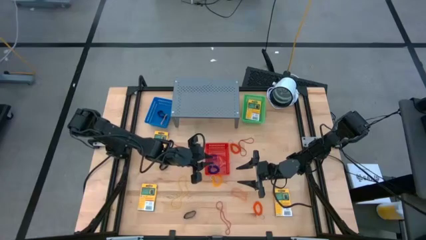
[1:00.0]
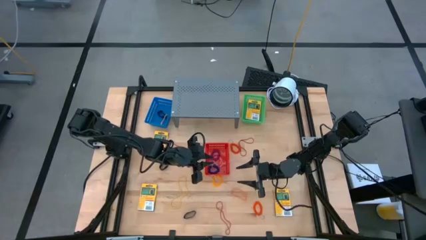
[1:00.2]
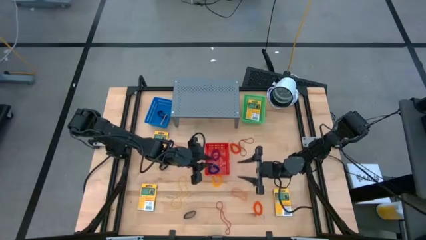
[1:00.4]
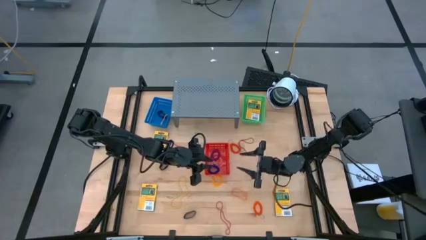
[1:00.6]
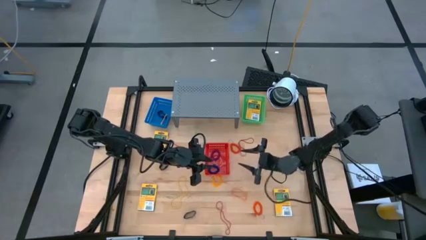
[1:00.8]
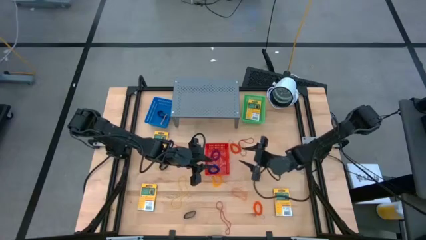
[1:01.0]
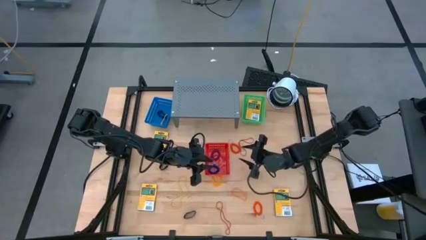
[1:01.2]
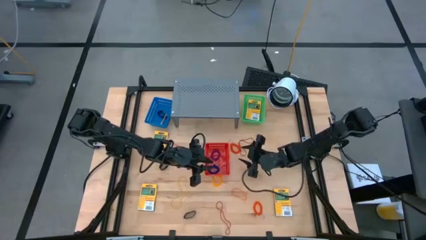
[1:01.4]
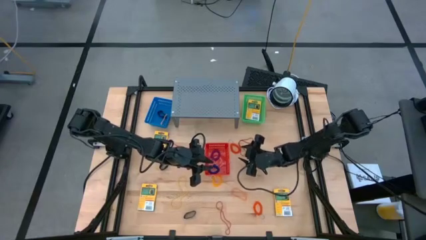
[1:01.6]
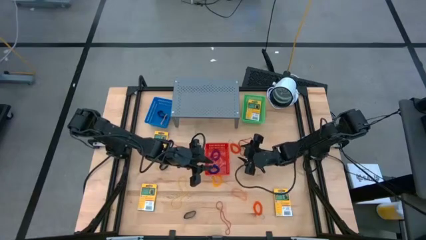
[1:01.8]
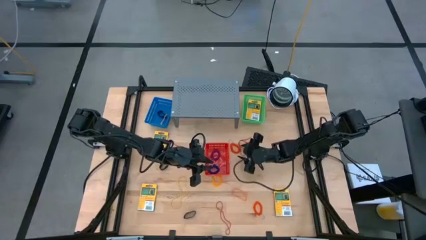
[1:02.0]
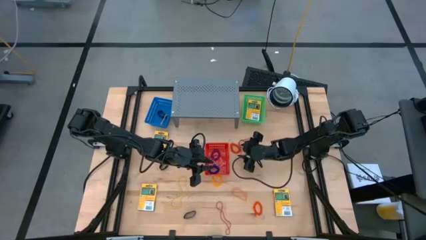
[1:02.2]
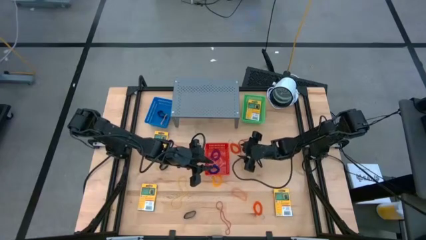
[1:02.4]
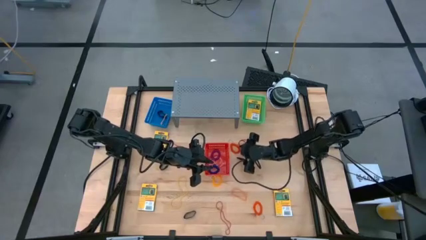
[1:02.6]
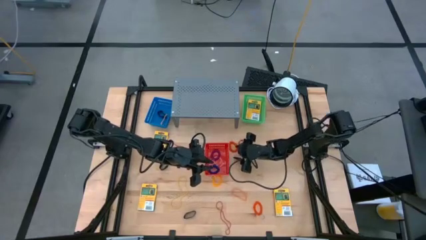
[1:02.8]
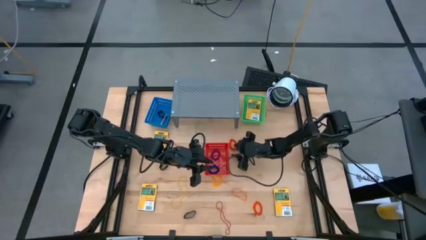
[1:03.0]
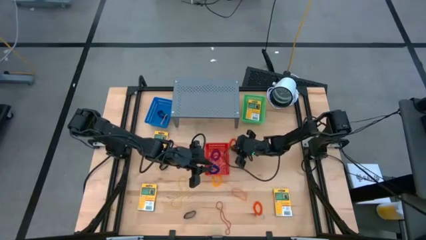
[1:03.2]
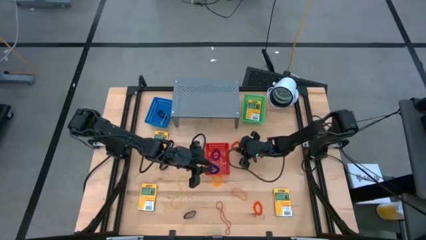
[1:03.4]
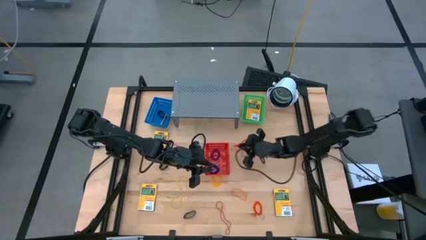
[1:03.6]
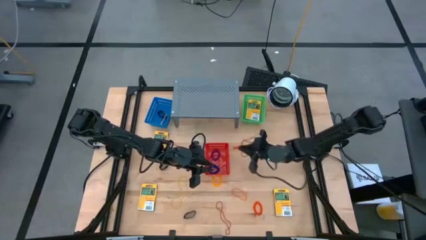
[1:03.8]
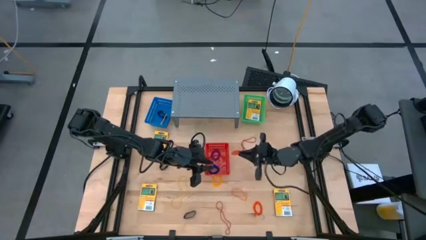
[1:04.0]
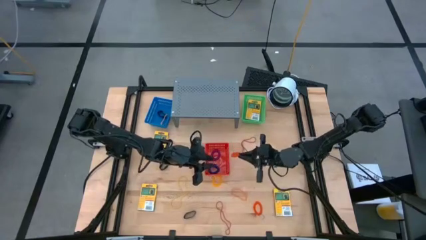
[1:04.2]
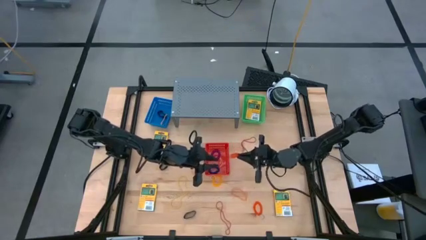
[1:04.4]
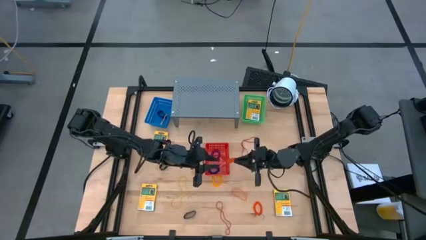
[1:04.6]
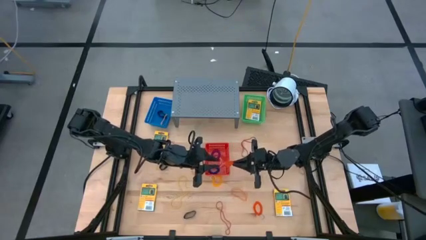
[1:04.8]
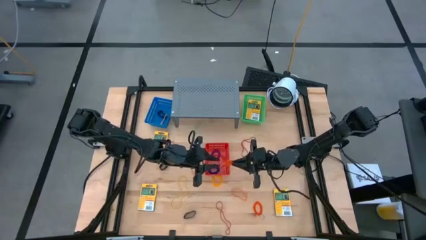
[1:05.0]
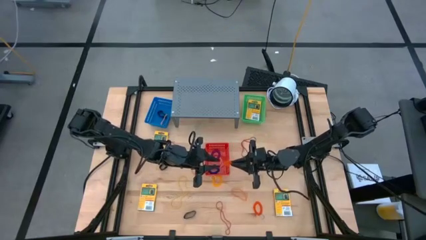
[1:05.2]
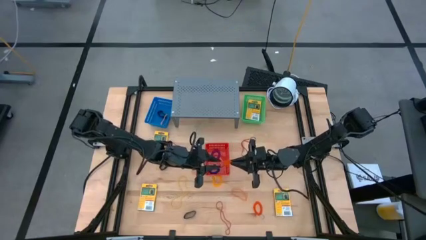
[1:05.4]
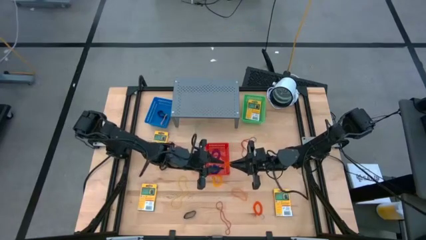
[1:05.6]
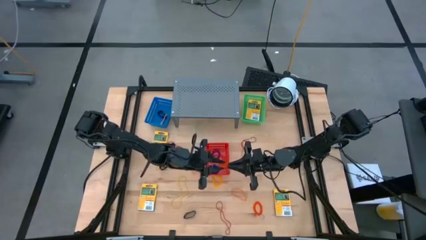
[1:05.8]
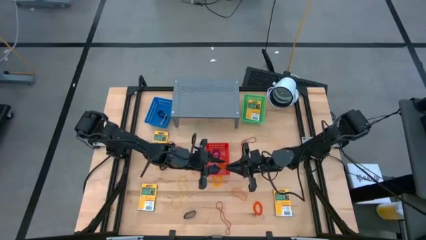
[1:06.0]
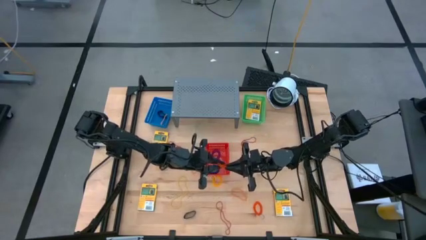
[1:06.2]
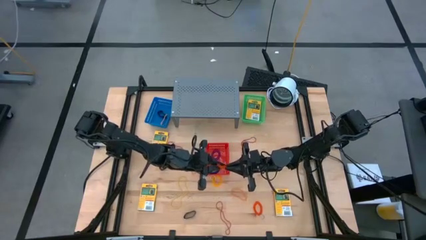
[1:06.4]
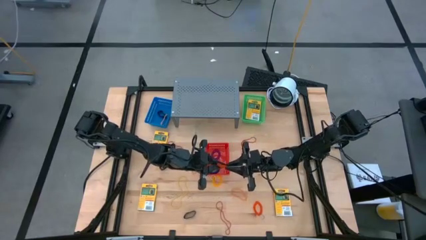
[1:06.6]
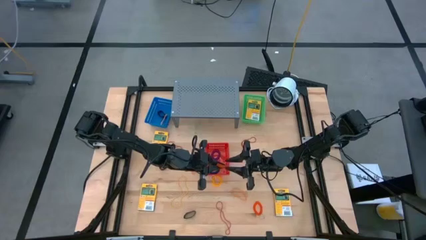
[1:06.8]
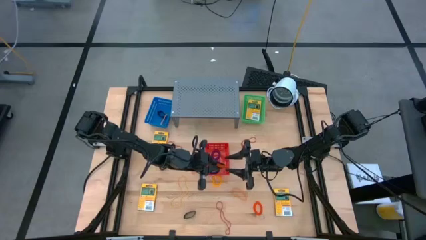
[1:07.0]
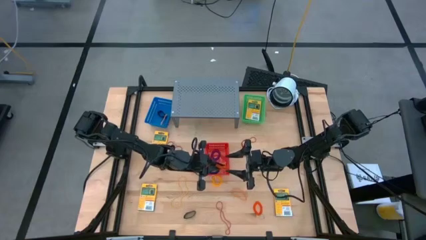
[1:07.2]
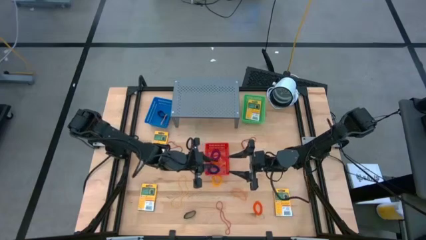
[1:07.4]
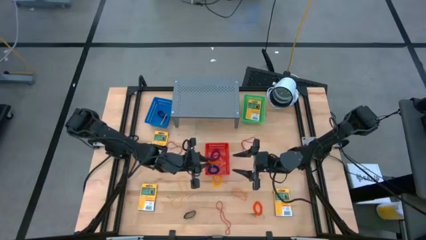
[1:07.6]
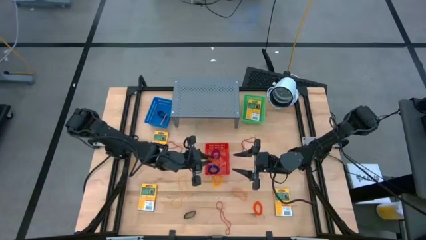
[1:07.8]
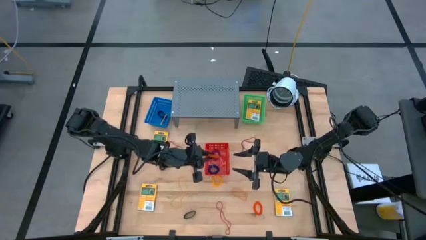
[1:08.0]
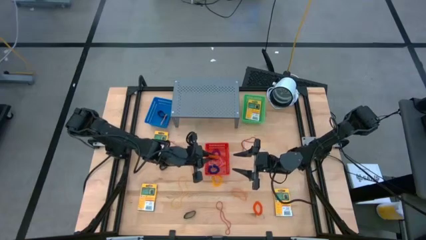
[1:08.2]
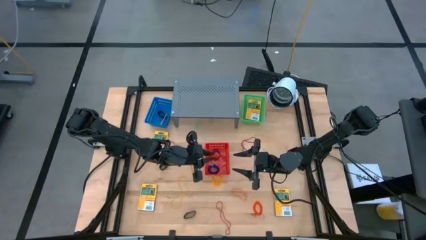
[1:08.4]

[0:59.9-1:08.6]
Task: Pick & Place Office Desk Supplies
Put the top orange spring keychain into the red basket

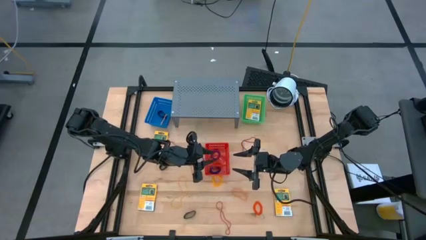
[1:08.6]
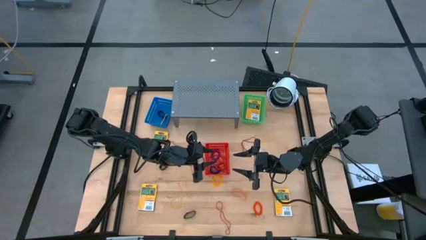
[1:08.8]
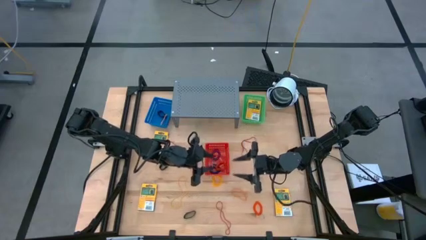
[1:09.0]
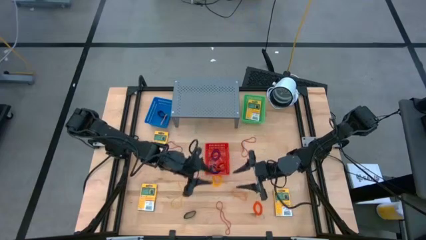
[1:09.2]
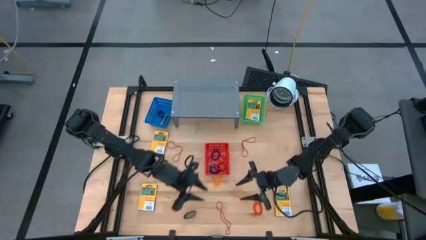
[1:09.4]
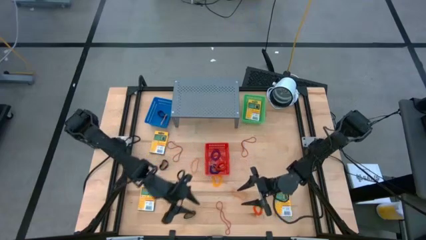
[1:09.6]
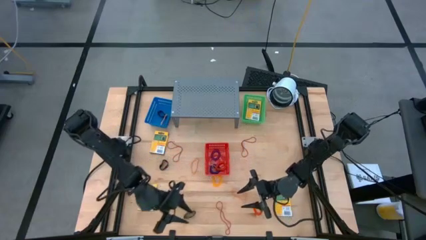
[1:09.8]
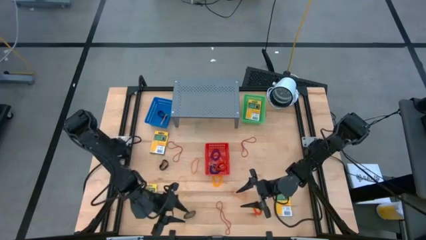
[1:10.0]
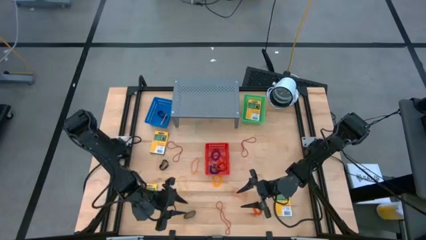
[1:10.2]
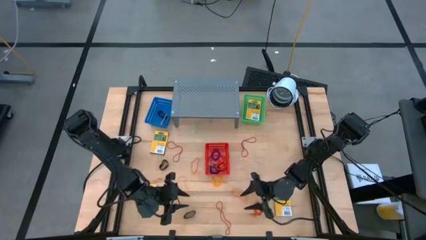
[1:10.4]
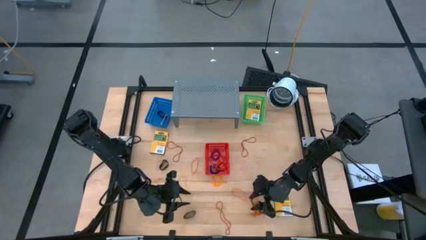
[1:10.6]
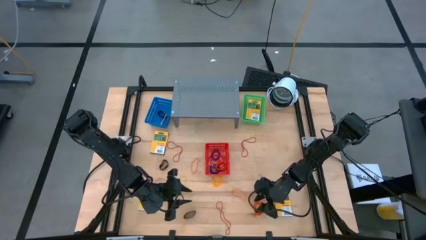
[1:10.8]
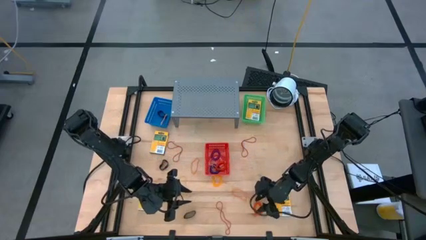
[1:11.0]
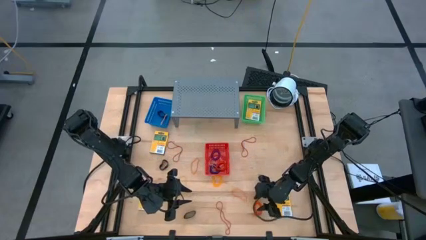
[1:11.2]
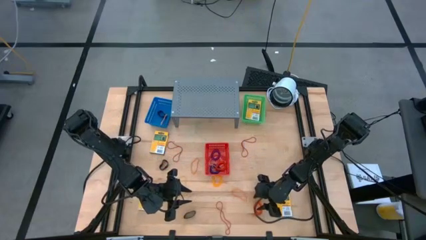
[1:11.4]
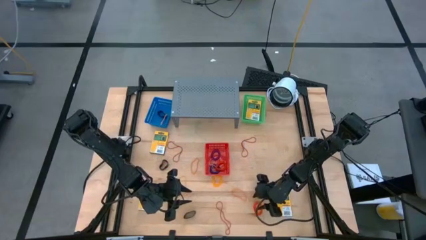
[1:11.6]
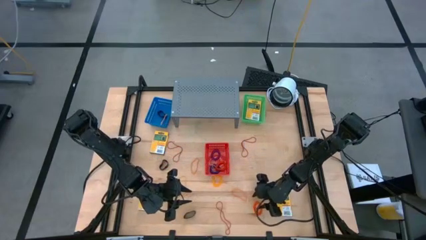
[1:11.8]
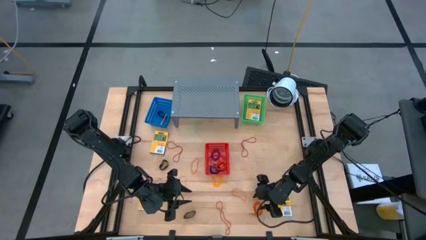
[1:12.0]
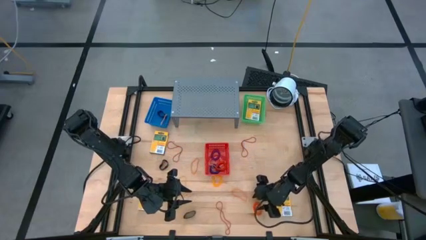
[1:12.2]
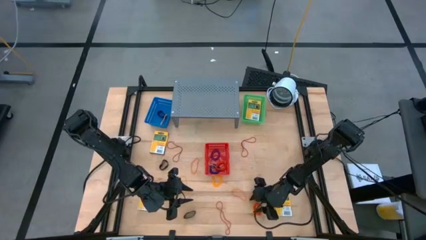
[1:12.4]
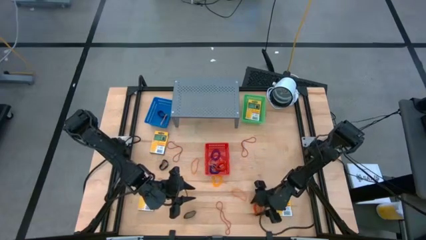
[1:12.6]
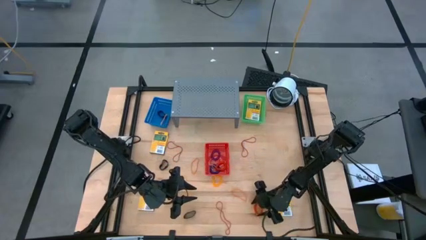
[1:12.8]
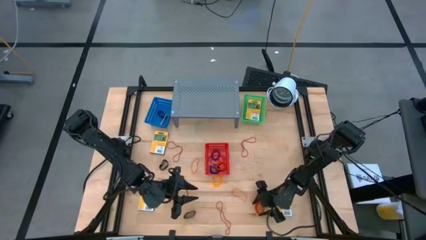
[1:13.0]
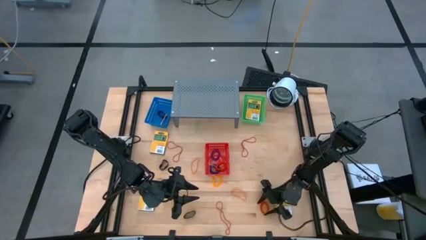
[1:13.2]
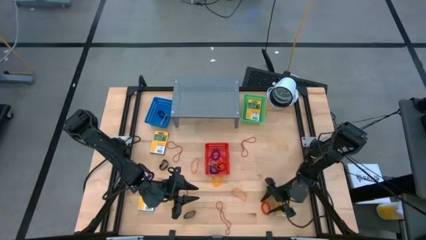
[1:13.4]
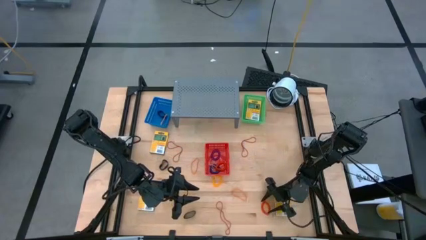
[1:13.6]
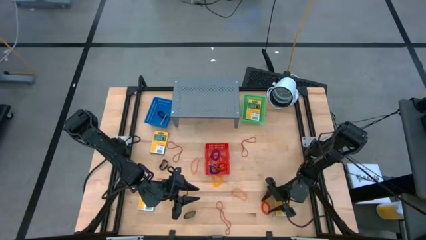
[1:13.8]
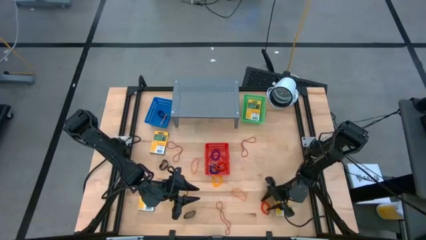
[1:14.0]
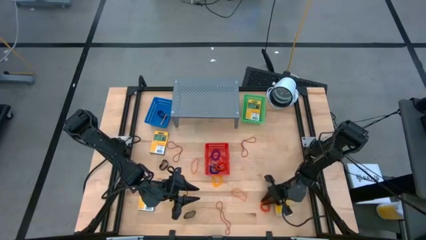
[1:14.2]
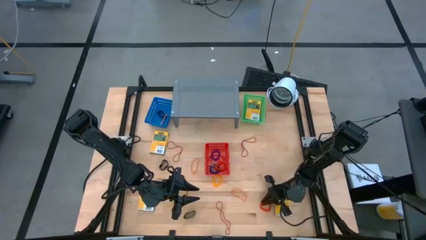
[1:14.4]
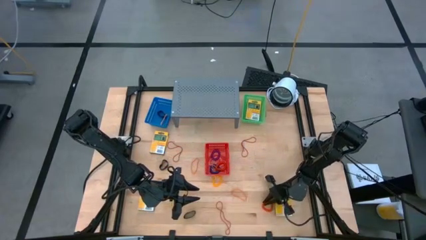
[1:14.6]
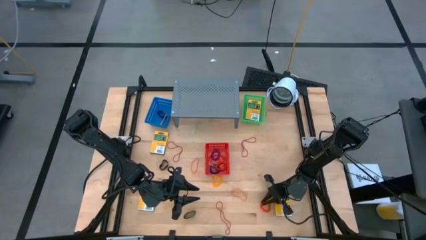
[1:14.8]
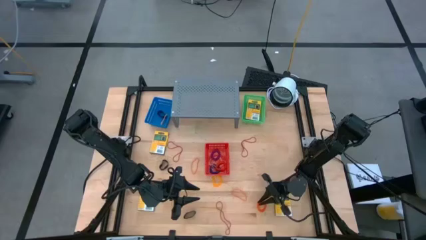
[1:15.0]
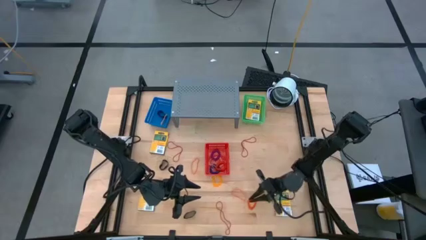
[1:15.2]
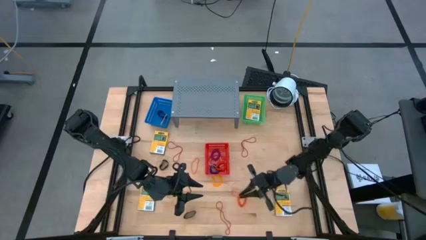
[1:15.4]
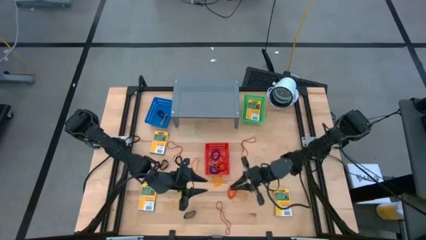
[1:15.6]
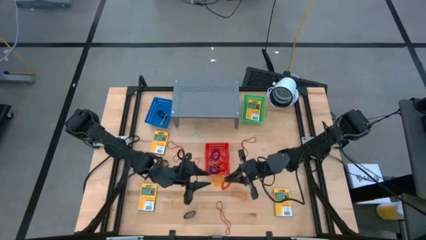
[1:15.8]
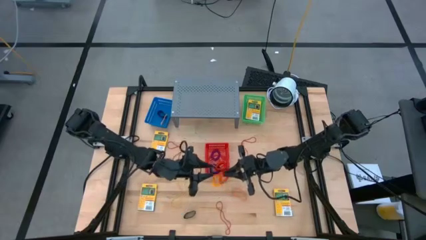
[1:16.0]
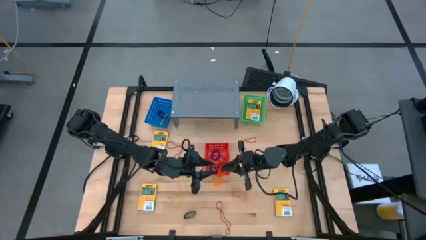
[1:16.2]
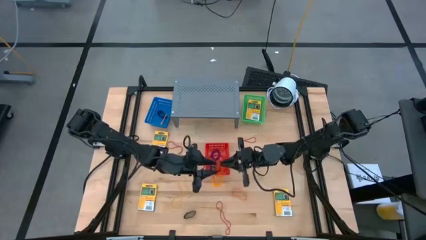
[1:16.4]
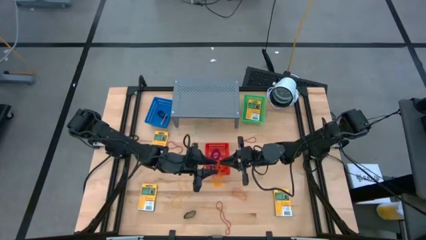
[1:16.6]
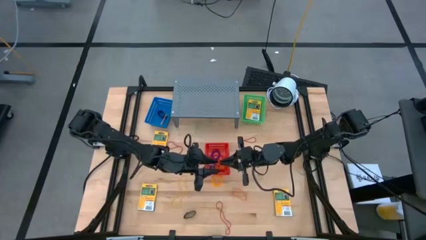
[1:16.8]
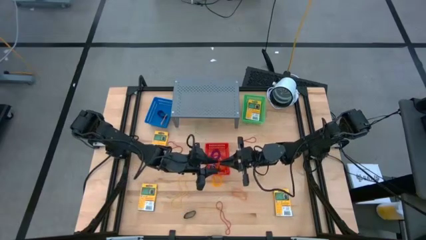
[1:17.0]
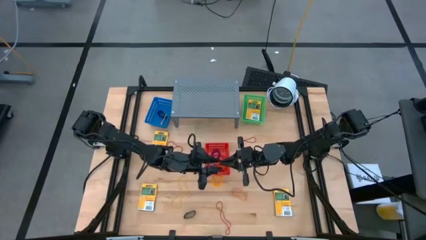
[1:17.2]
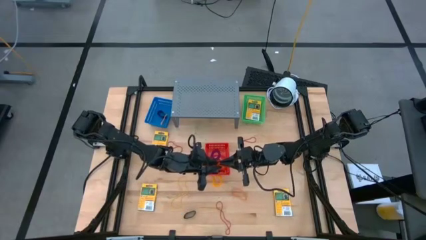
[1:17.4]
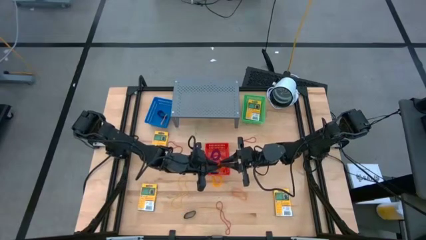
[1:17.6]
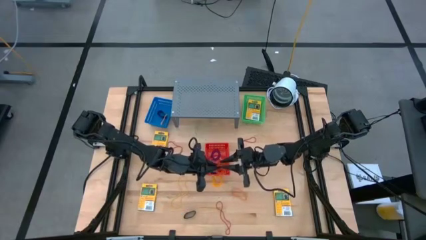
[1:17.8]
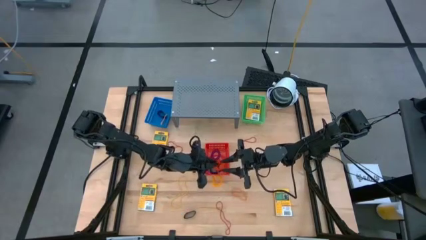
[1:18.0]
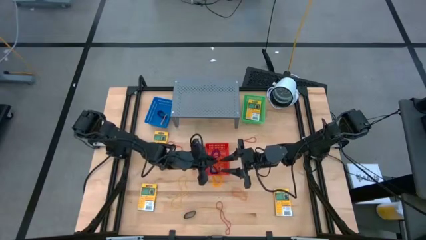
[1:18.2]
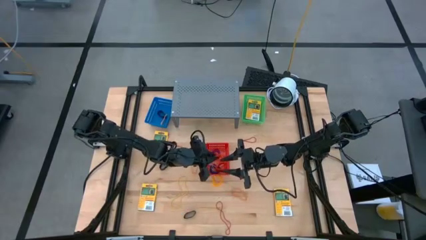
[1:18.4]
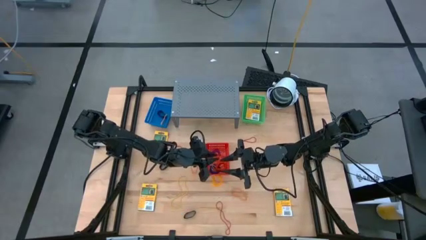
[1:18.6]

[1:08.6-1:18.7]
Put the orange spring keychain into the red basket
